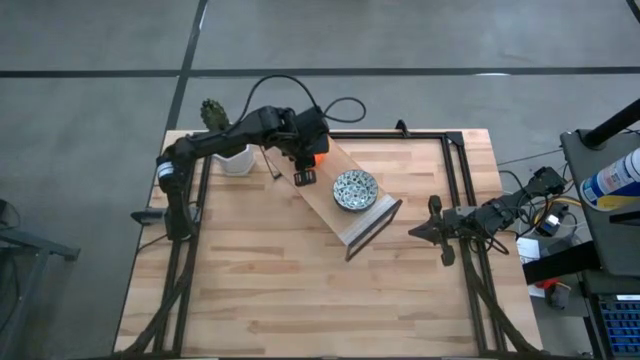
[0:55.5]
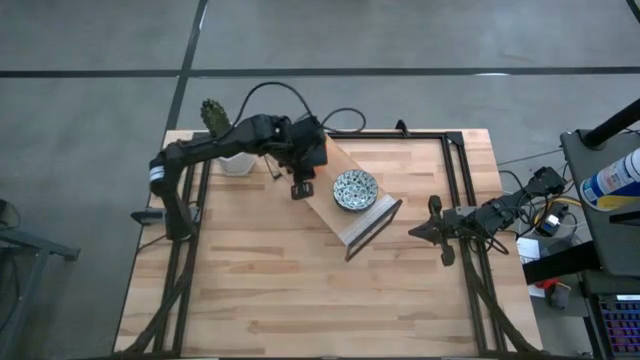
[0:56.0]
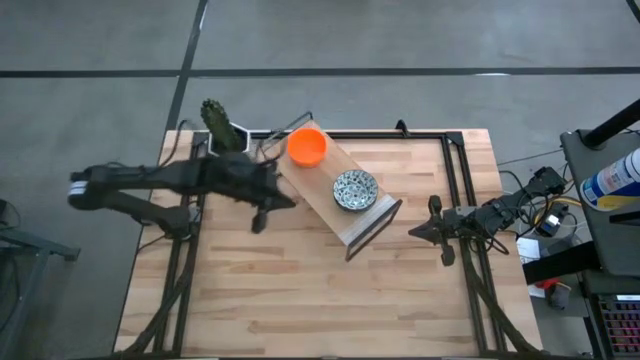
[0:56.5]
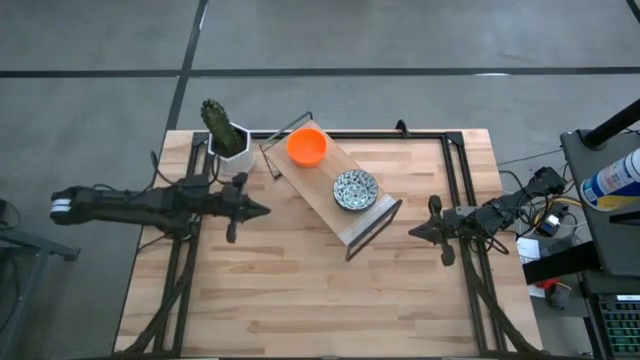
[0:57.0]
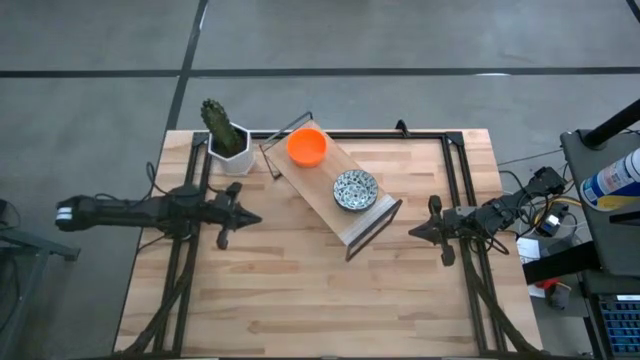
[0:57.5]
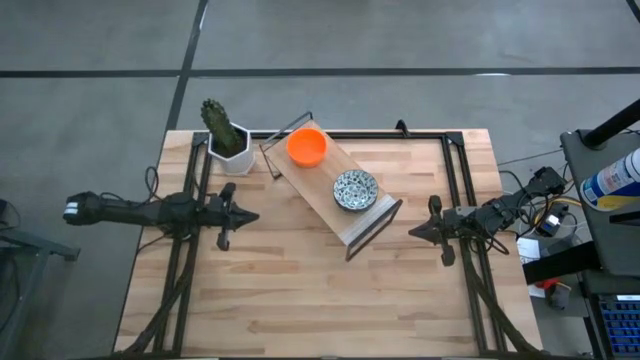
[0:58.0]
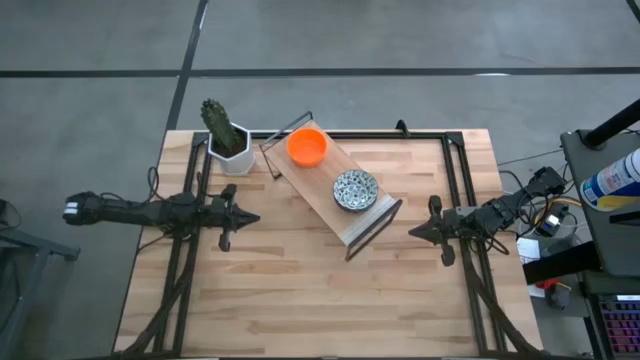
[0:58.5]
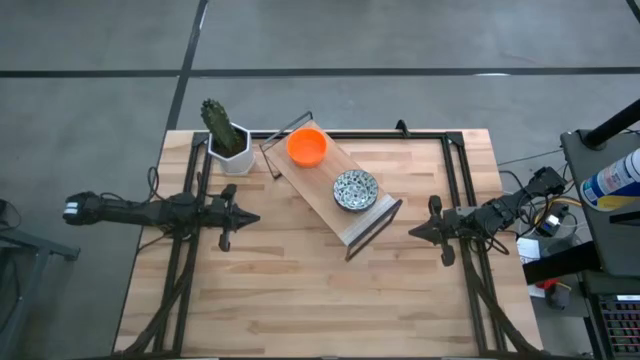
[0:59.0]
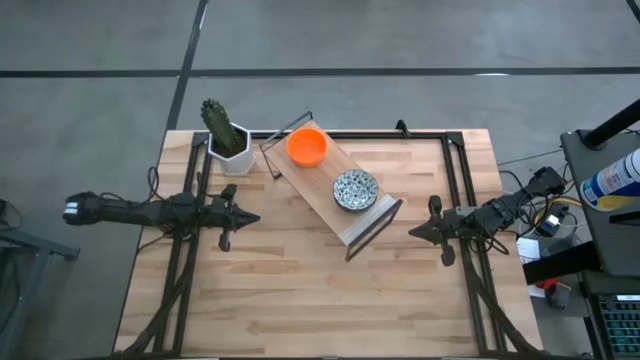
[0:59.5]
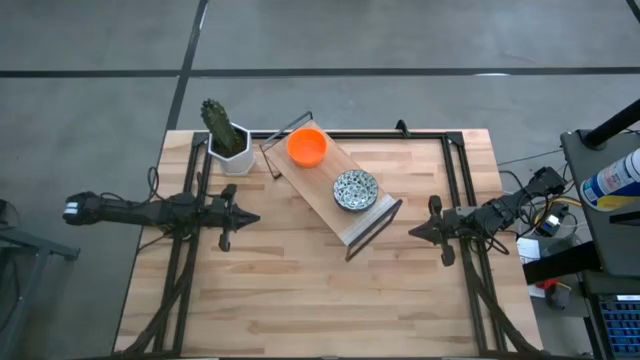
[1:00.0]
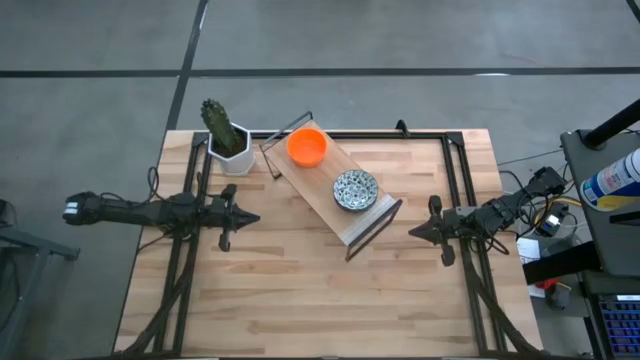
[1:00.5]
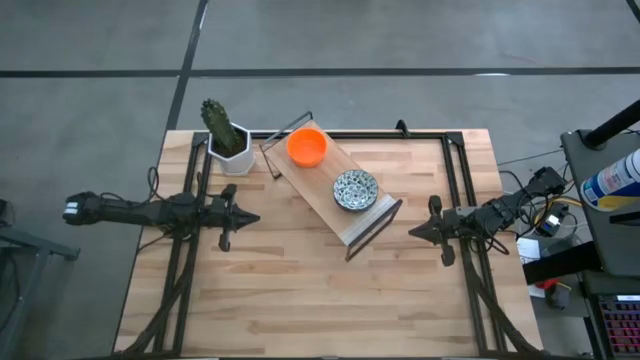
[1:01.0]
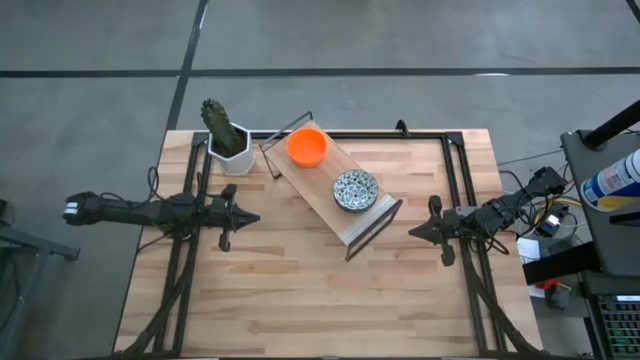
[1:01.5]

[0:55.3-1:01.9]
Task: Pick & Place Mini bowls
Return to Home Position

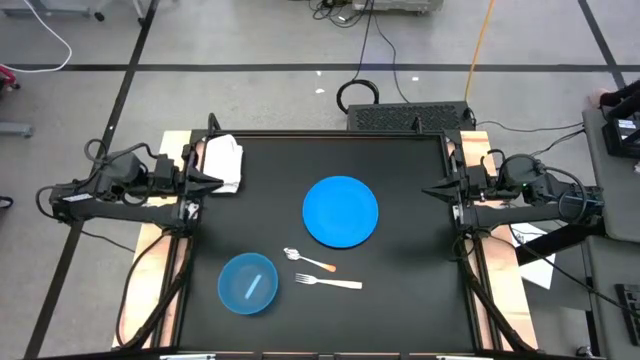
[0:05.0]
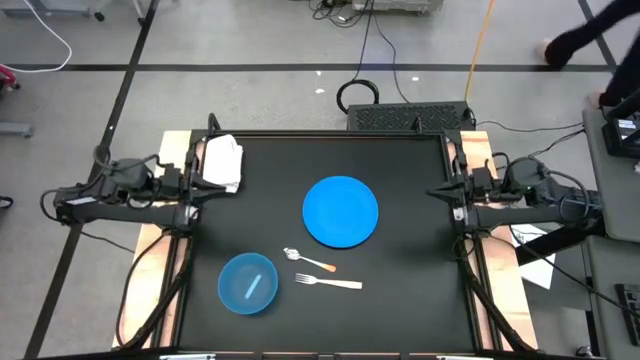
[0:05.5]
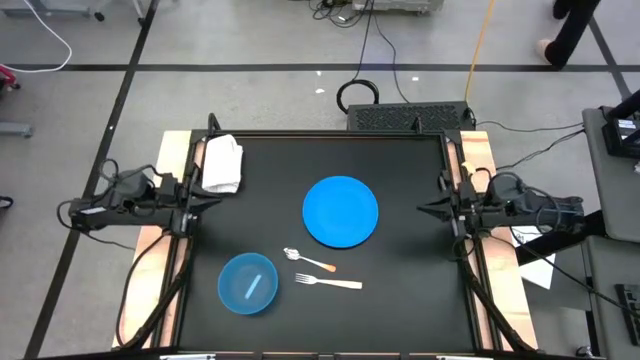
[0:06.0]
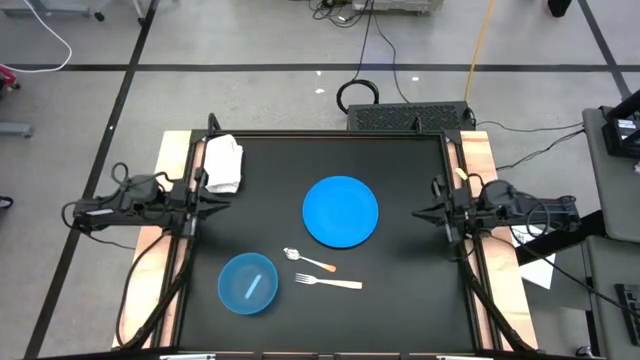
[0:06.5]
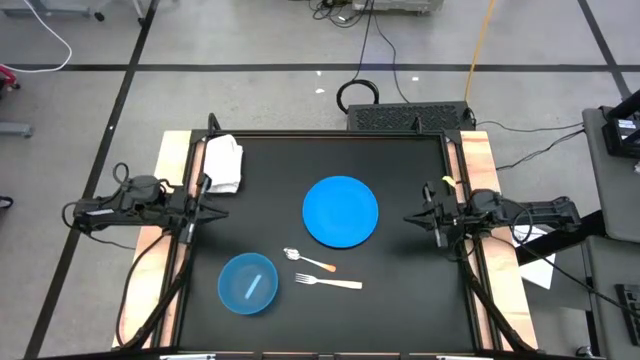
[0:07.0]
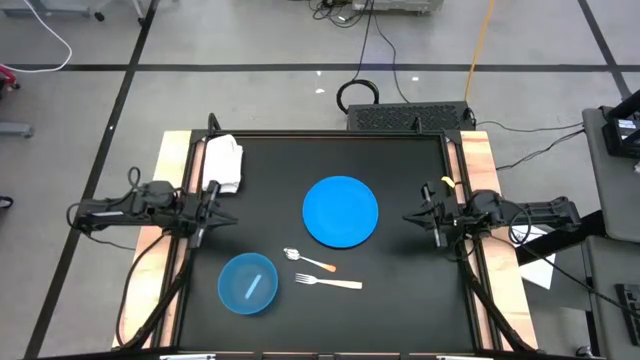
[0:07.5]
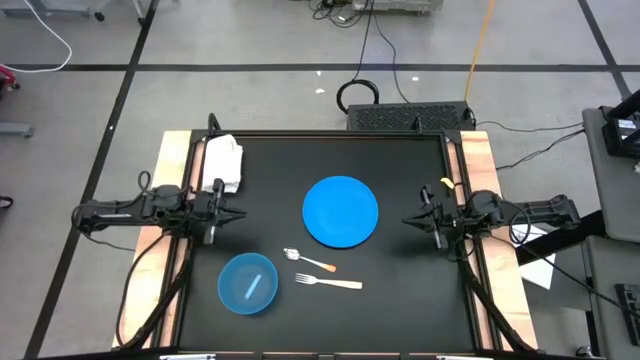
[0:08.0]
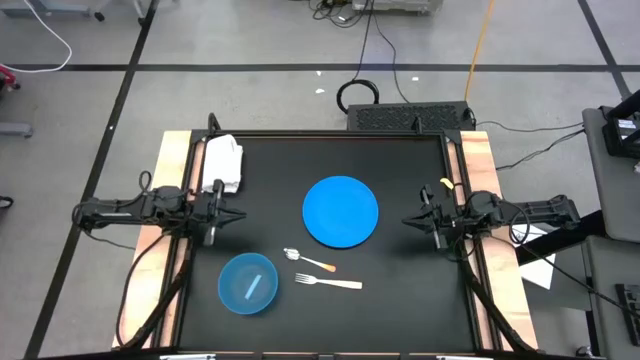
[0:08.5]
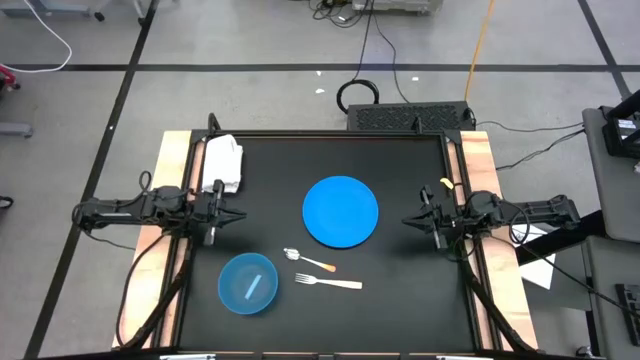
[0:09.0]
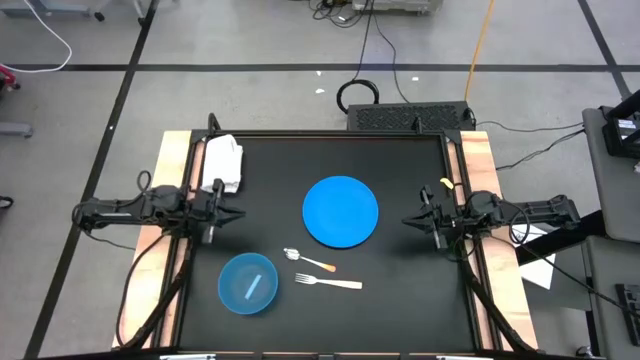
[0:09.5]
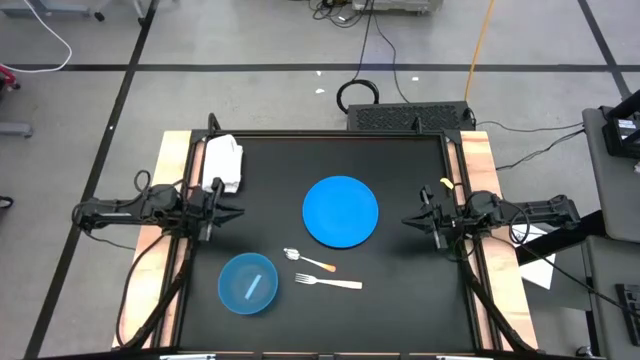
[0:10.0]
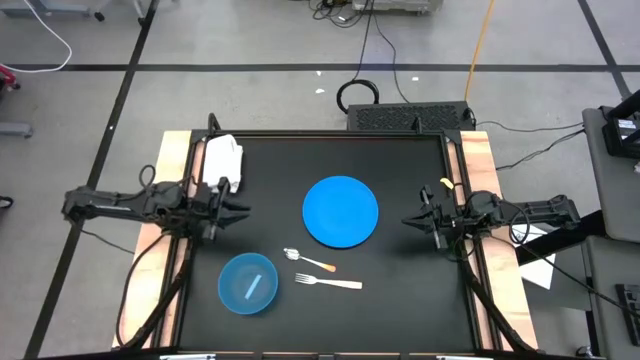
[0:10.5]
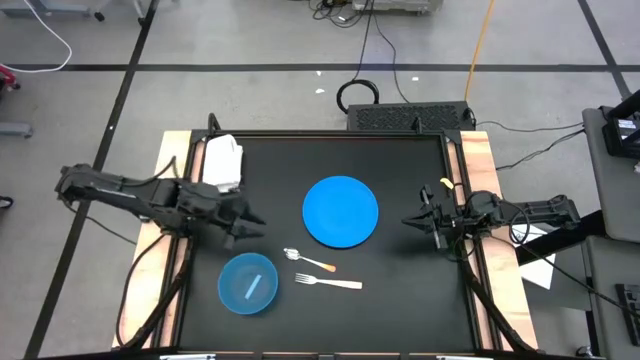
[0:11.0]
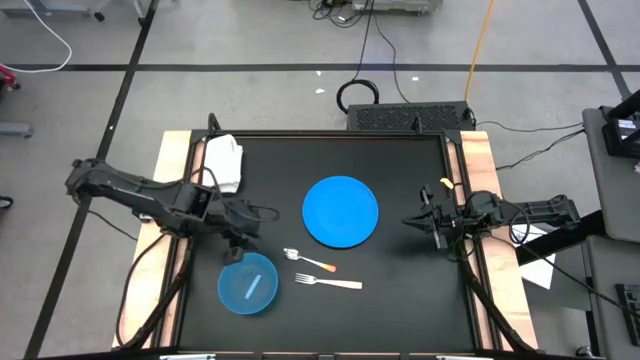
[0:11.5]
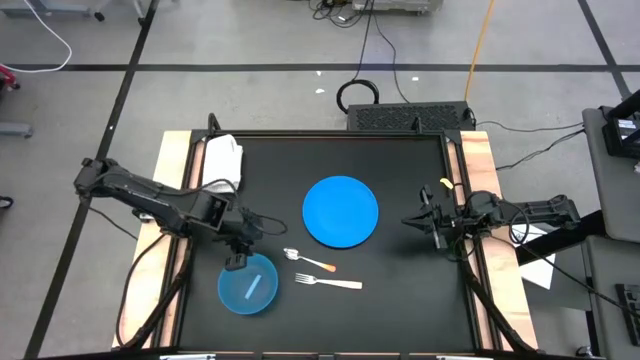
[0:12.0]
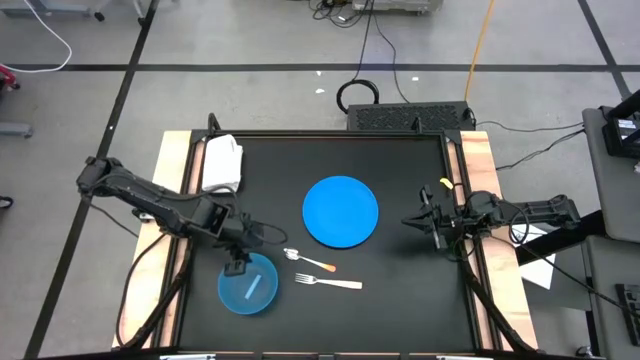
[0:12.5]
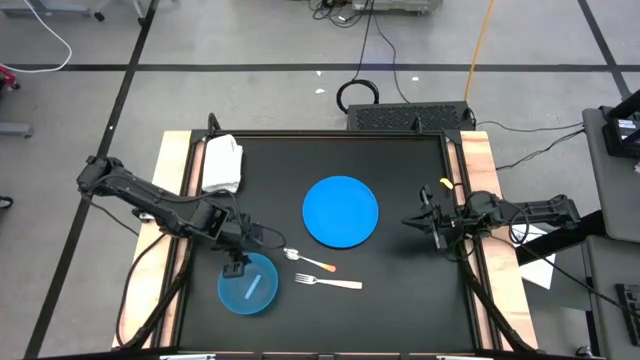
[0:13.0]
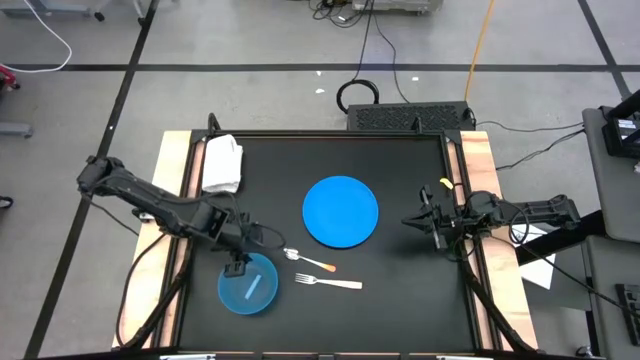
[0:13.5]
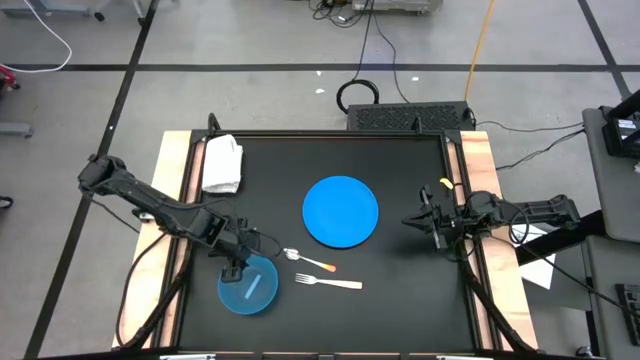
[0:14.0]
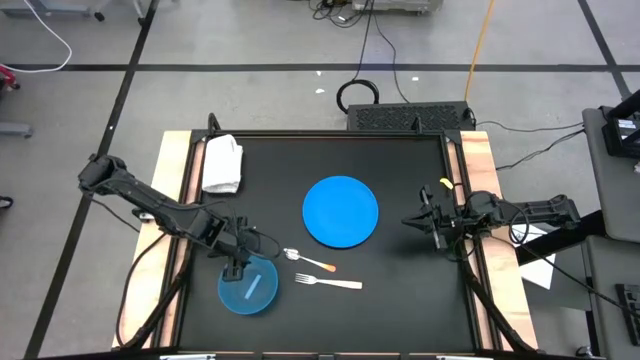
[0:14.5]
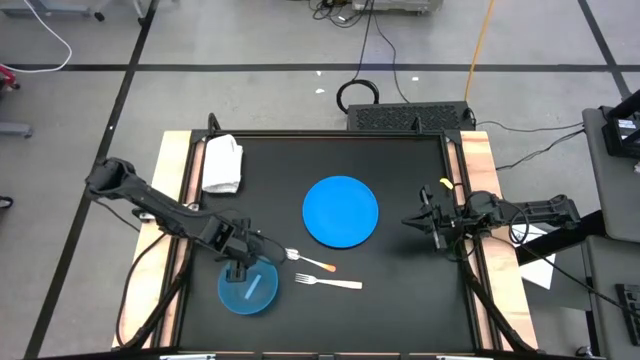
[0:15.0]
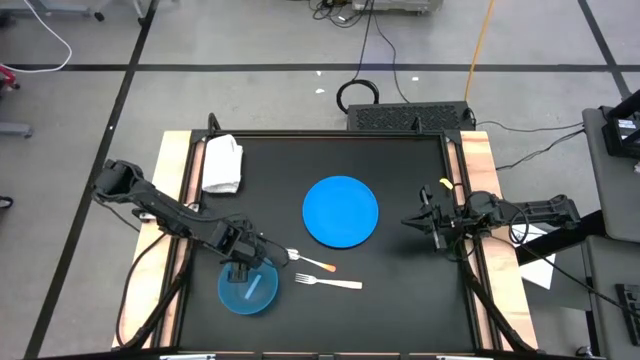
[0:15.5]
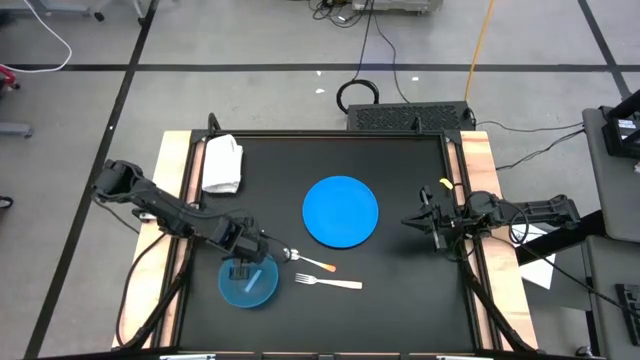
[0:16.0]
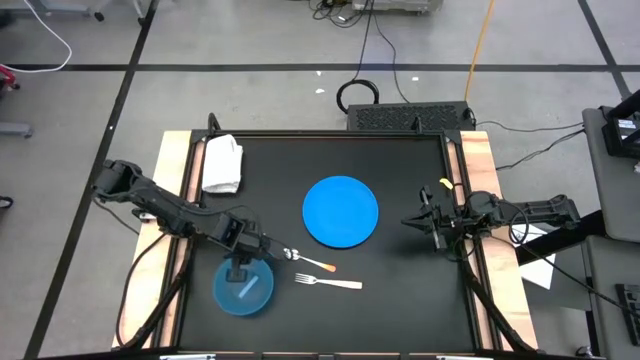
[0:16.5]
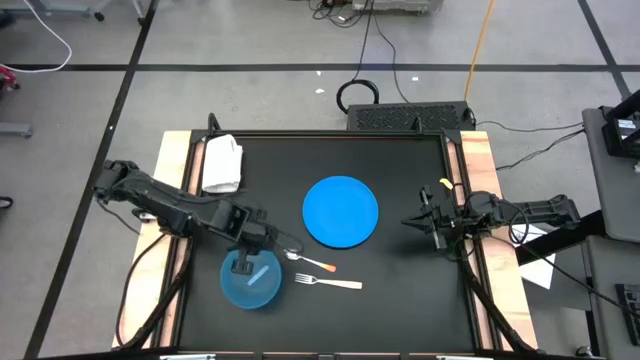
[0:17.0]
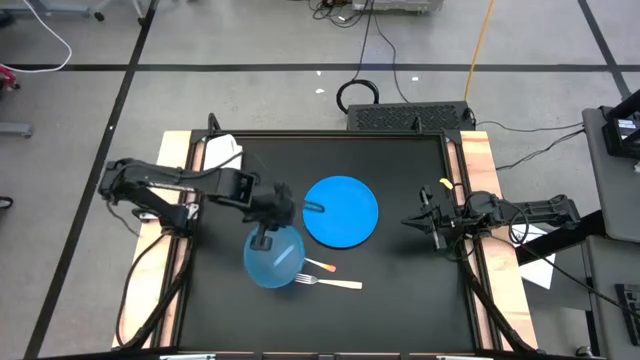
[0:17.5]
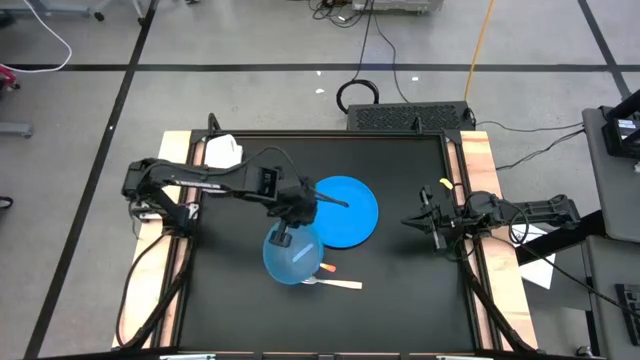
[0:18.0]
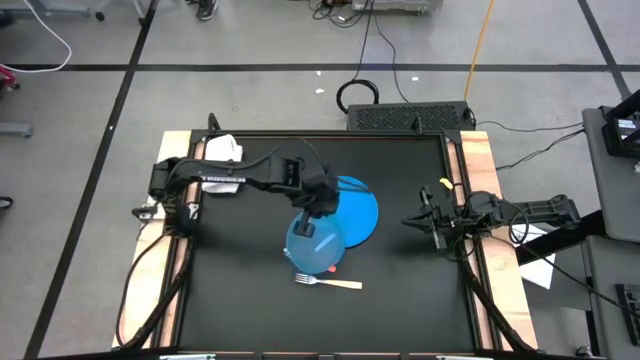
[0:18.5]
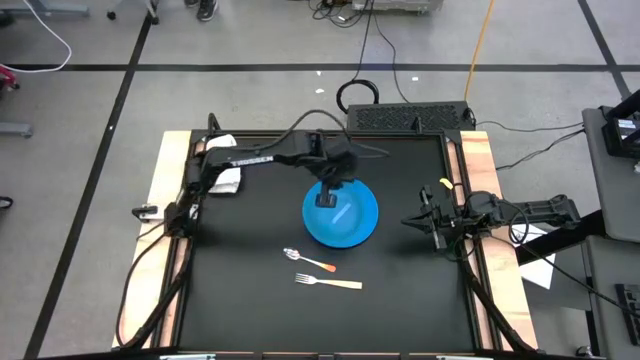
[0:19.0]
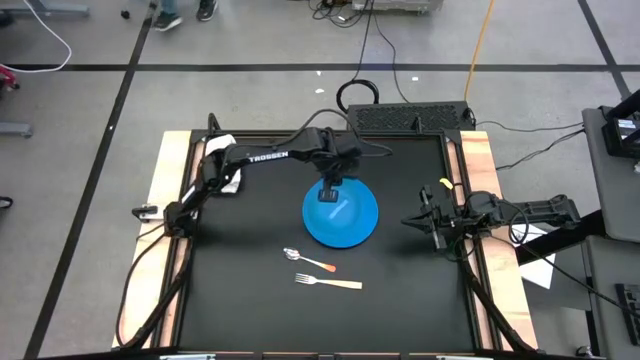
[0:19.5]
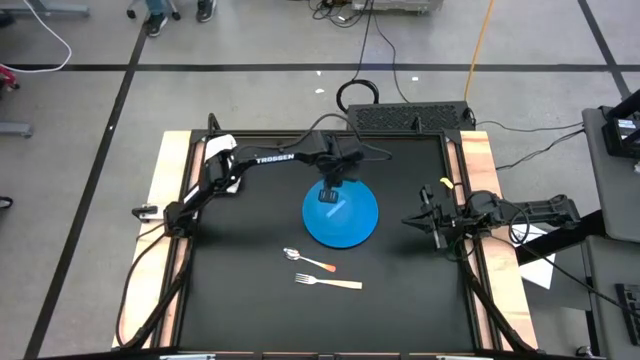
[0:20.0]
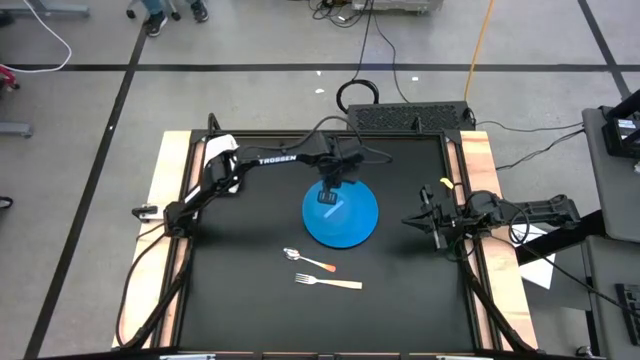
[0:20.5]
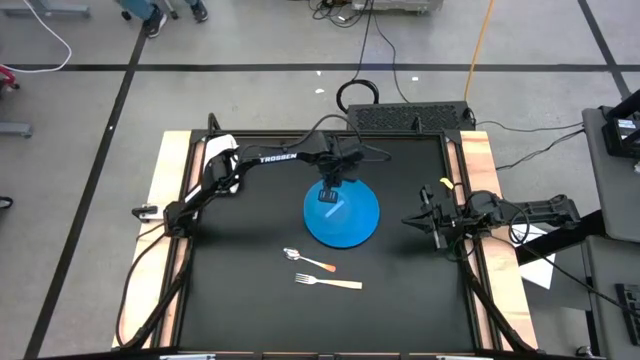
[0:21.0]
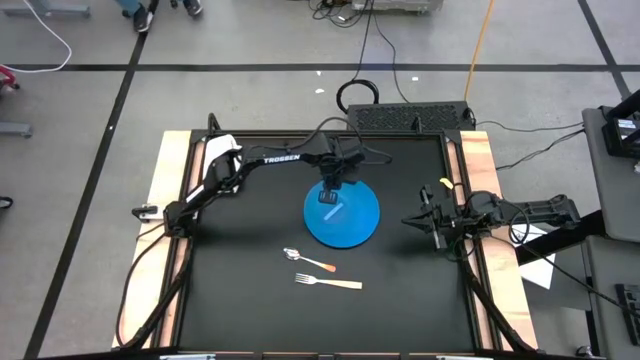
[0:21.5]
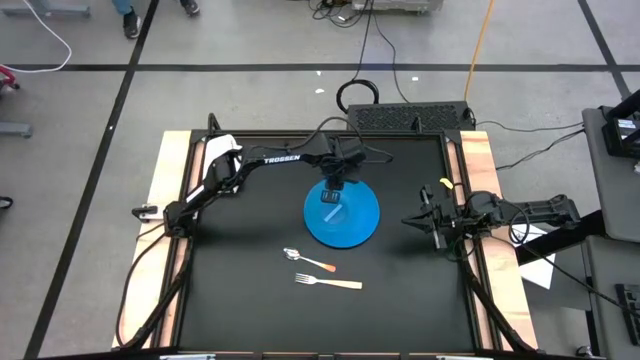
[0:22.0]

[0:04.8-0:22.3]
Task: Set table place
Put the blue bowl on the blue plate on the table
